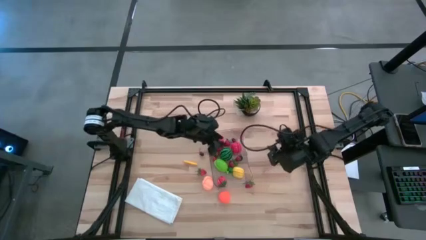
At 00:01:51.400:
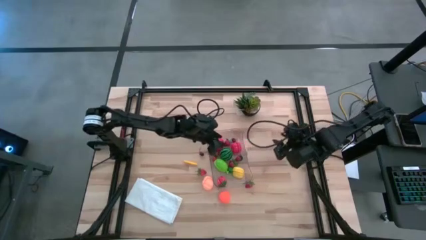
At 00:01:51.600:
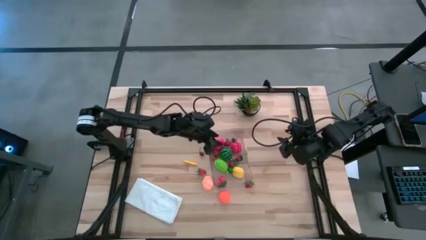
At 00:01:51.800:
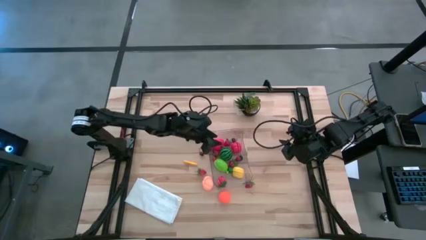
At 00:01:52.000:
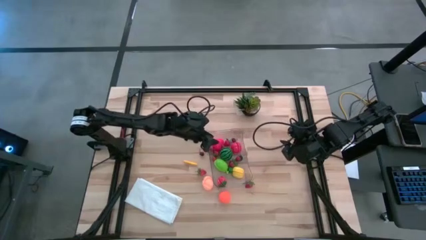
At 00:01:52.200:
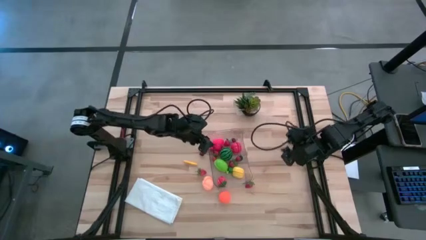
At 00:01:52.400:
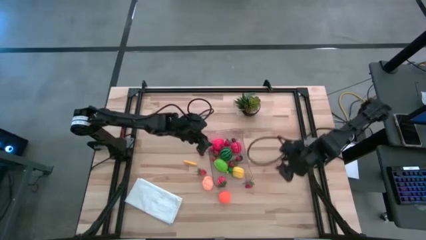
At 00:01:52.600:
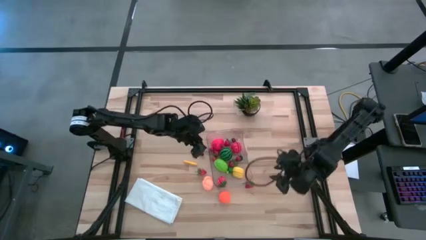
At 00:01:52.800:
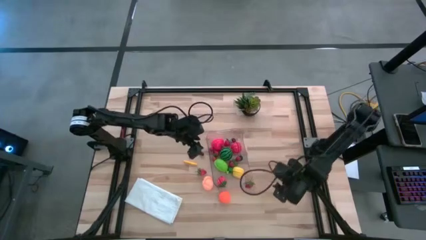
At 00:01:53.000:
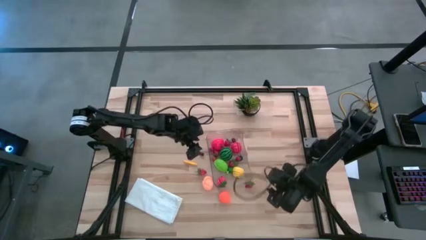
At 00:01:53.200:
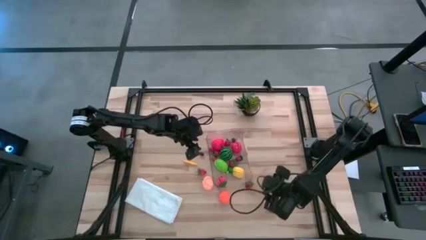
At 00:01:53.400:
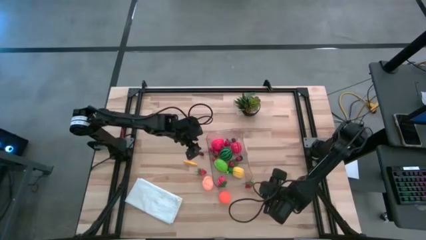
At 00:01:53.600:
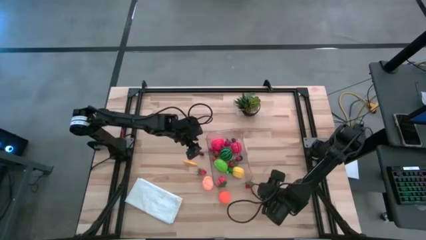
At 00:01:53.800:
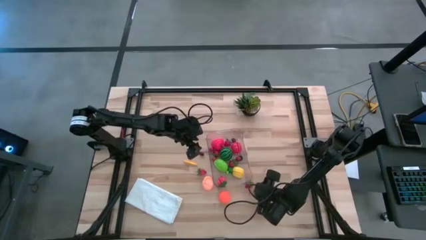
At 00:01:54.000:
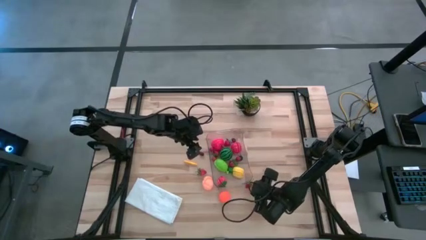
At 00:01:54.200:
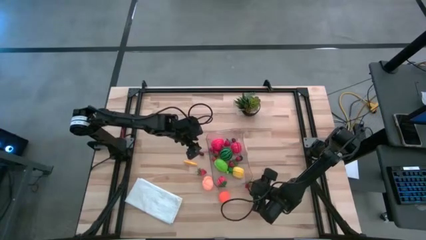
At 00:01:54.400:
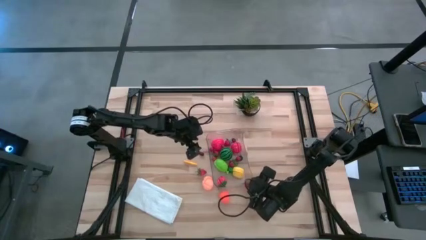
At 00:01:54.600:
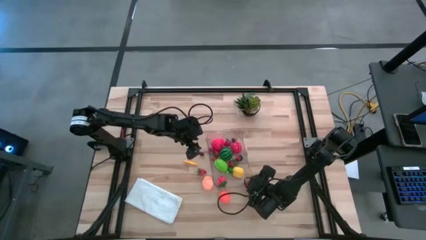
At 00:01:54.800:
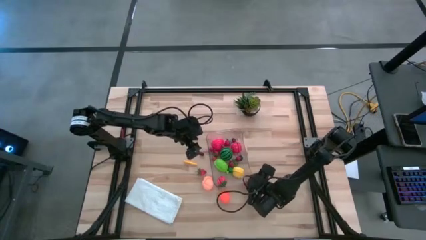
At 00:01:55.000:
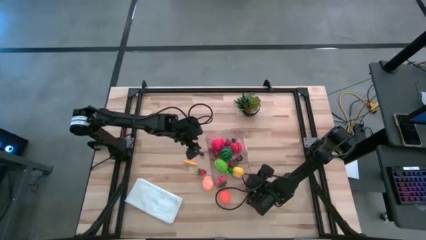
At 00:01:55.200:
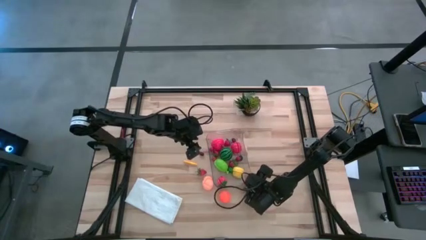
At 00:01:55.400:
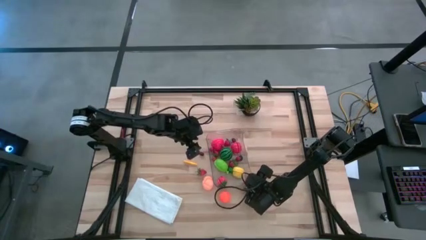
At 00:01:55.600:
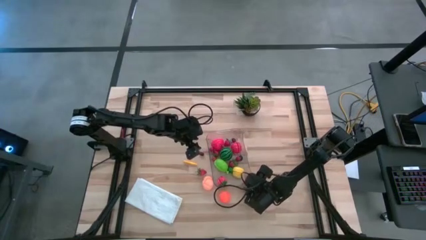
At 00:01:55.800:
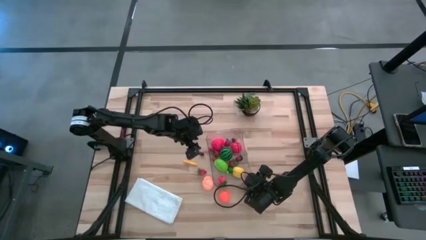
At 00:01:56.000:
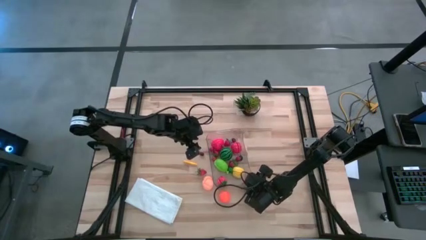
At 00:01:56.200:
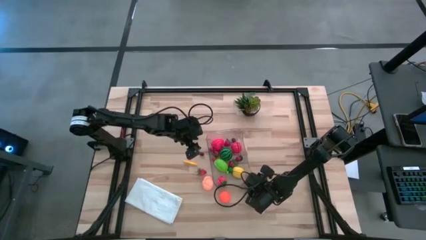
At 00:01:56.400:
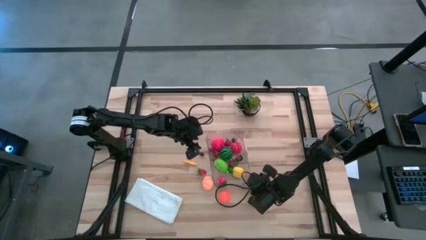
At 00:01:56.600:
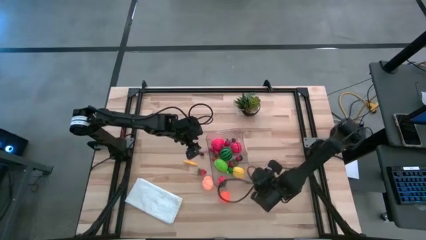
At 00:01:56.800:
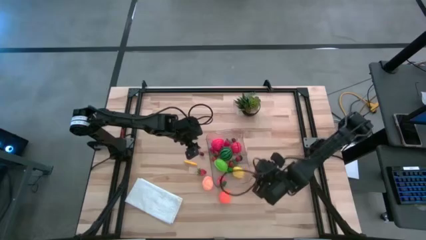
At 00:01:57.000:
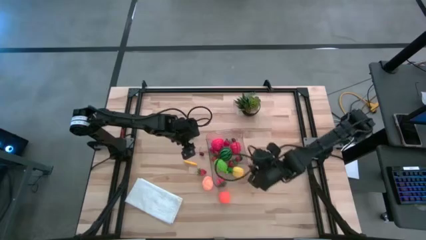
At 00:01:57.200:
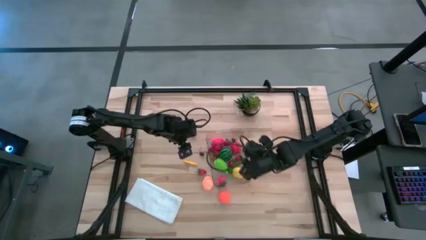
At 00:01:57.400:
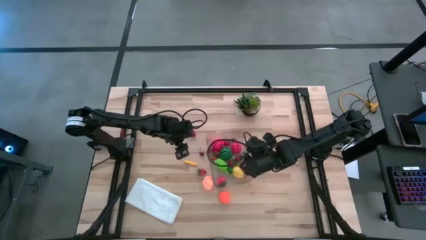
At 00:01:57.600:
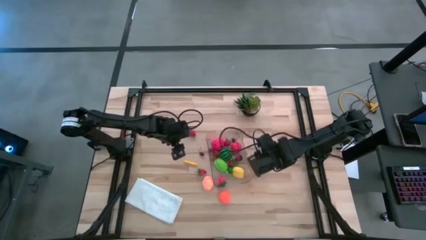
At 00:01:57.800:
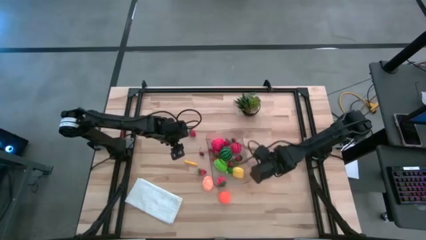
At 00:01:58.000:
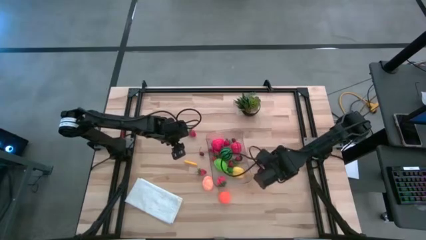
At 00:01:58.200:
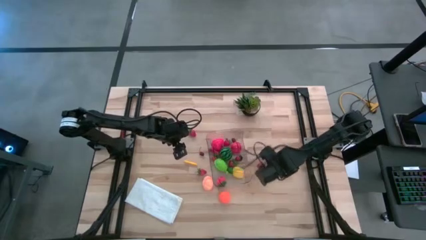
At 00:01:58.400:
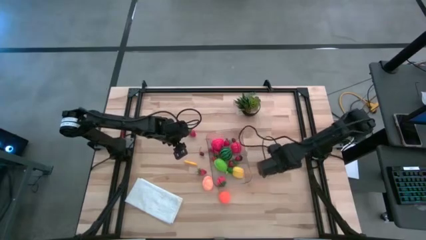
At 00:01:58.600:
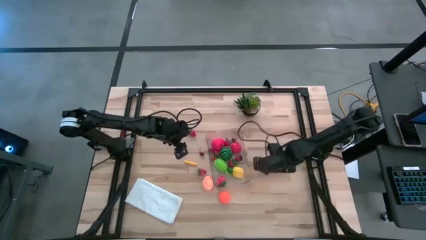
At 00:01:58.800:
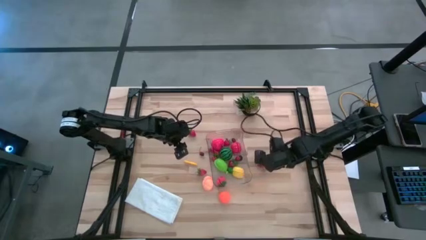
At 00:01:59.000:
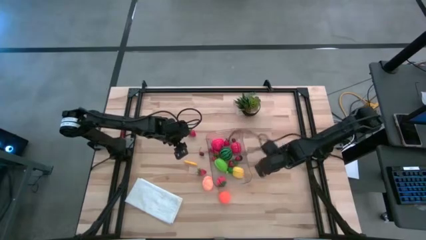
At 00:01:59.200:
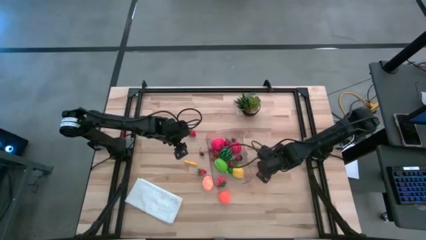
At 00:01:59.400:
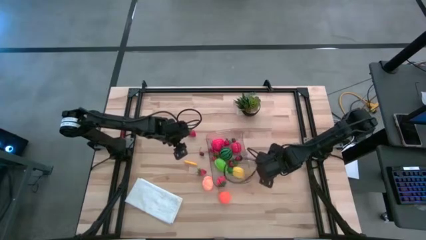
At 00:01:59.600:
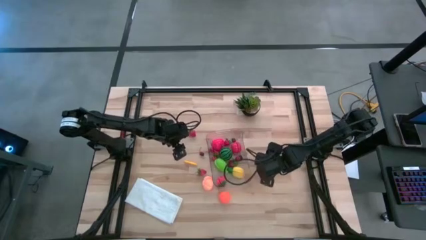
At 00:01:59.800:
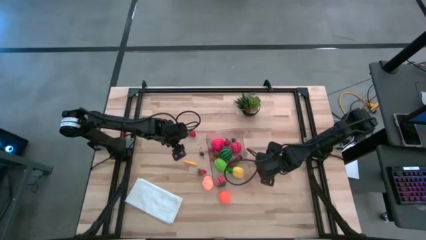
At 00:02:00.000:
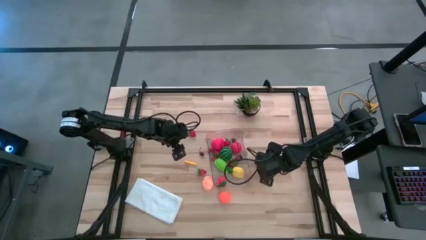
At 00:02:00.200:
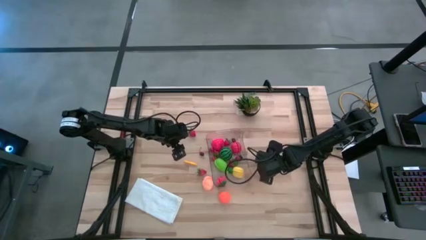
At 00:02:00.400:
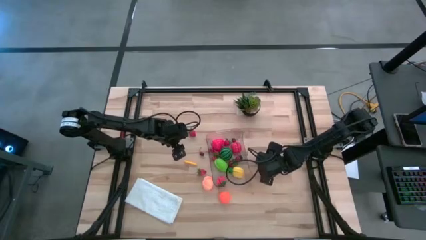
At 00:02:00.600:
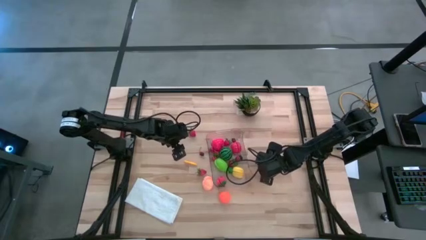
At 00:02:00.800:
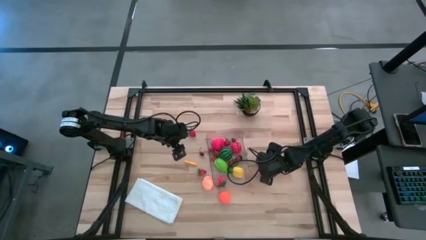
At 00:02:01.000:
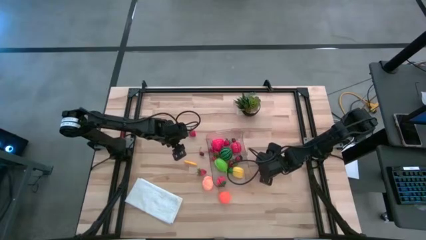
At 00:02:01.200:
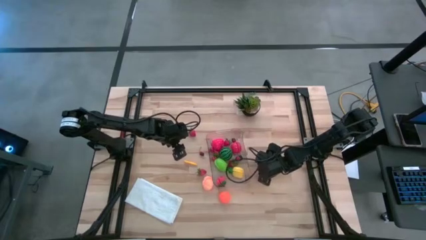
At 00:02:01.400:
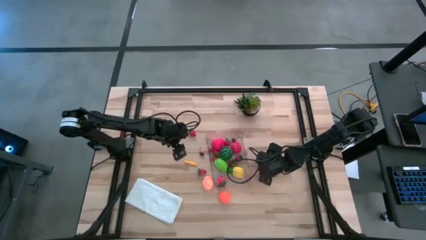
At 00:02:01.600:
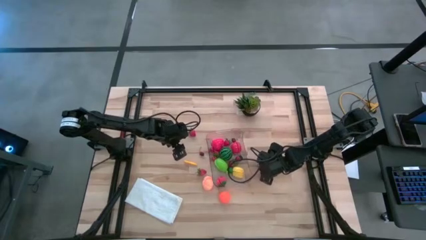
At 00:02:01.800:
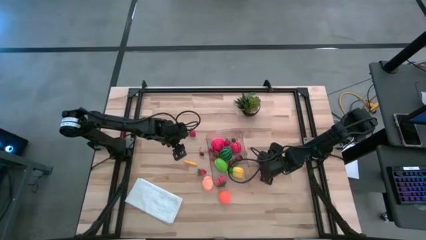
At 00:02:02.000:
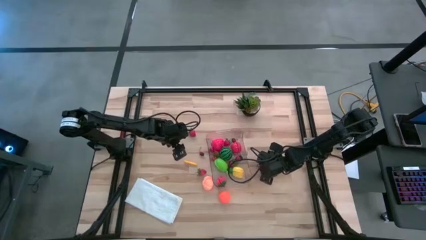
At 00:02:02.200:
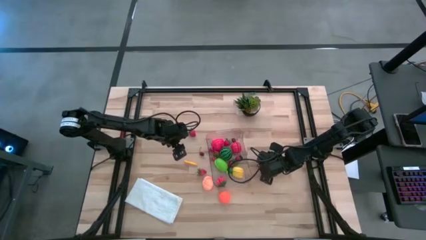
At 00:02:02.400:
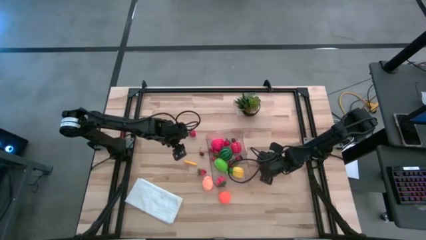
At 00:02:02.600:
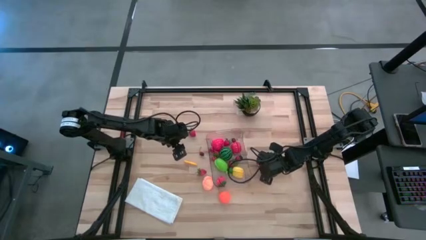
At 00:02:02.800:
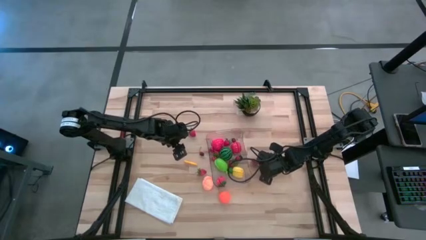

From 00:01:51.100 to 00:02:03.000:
Task: Pick and placing Produce into tupperware
Put the red strawberry into the transparent bin

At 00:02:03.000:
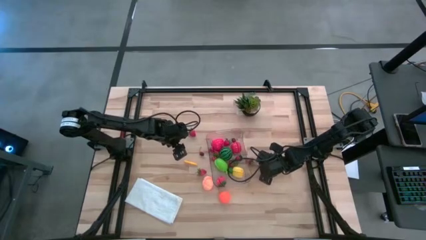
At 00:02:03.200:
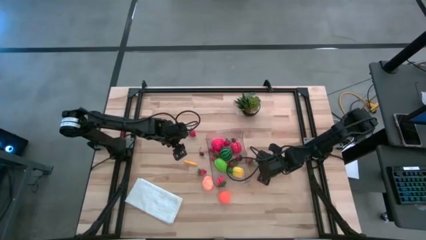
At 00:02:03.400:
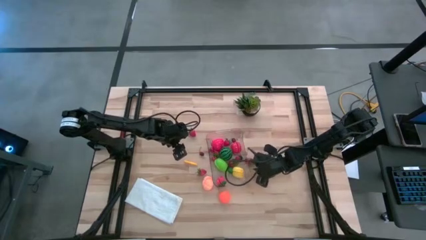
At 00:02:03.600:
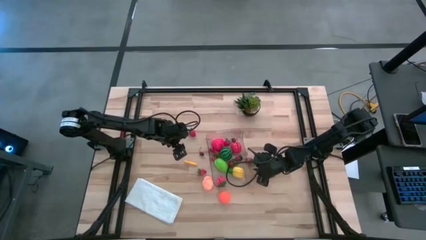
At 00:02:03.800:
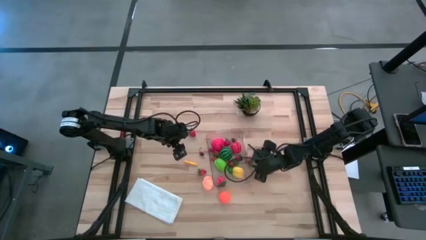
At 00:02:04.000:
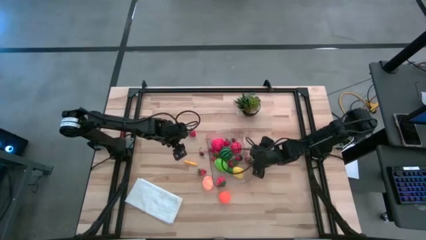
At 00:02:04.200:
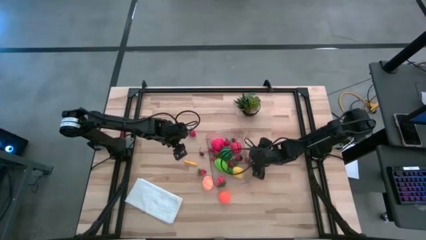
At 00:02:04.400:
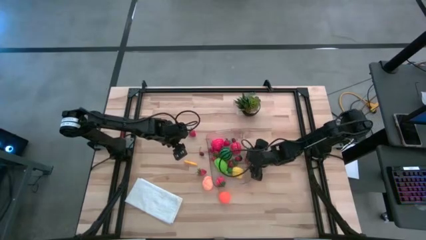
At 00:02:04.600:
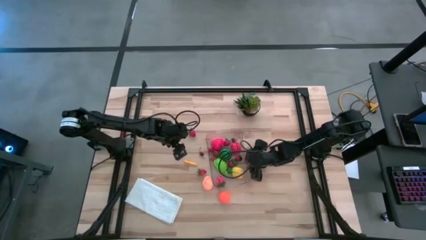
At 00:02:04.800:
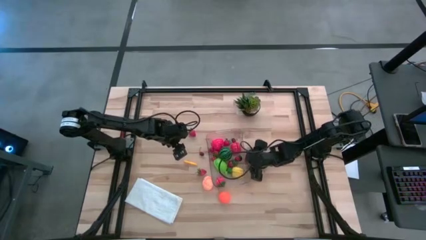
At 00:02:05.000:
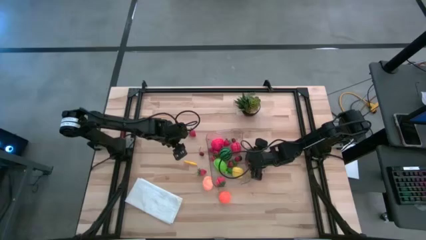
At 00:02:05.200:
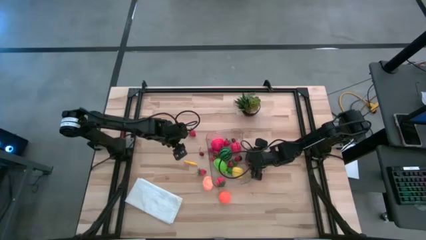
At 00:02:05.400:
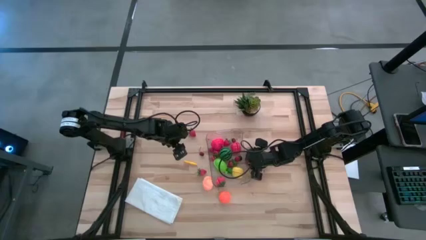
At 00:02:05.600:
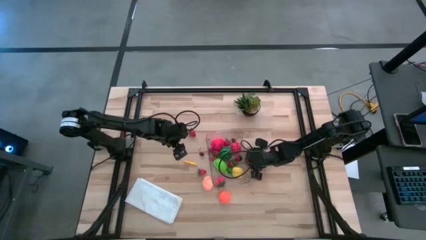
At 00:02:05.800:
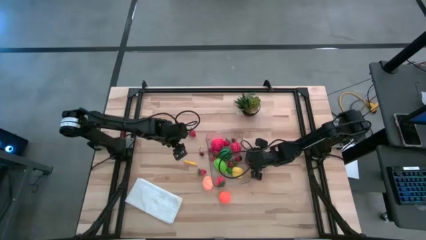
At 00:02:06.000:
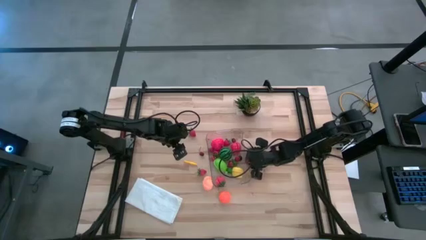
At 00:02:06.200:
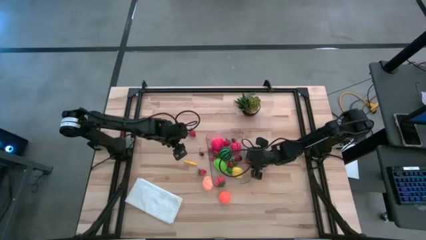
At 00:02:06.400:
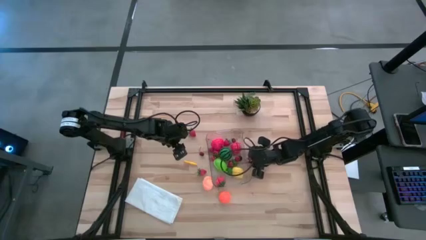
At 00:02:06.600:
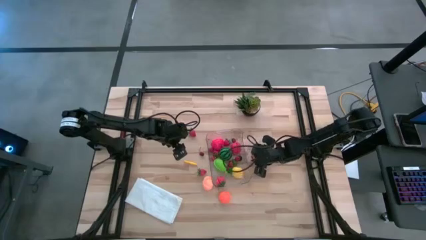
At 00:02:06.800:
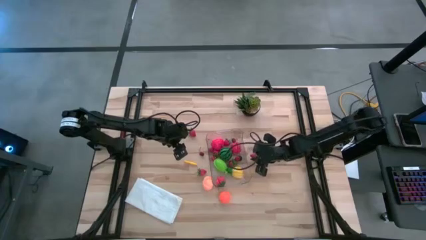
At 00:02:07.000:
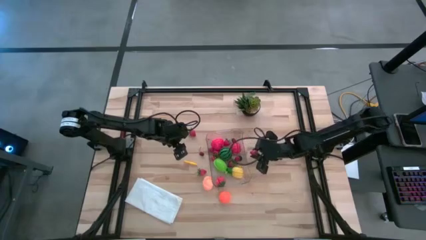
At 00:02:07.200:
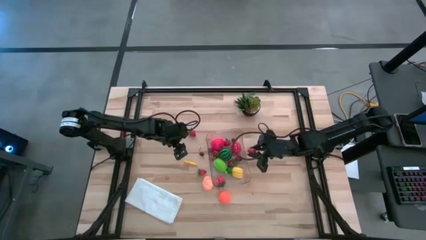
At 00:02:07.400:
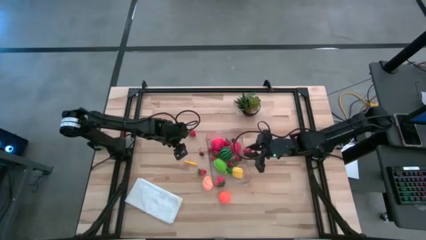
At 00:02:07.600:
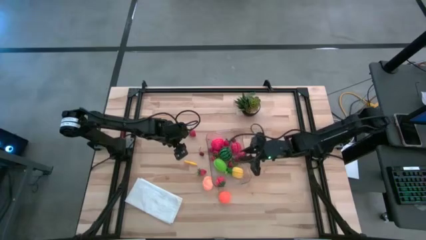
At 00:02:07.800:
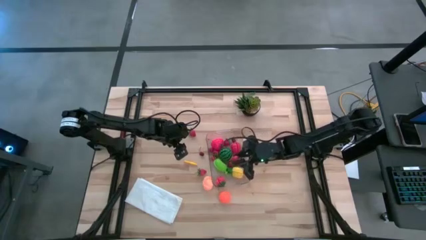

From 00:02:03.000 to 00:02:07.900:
Put the red strawberry into the transparent bin
